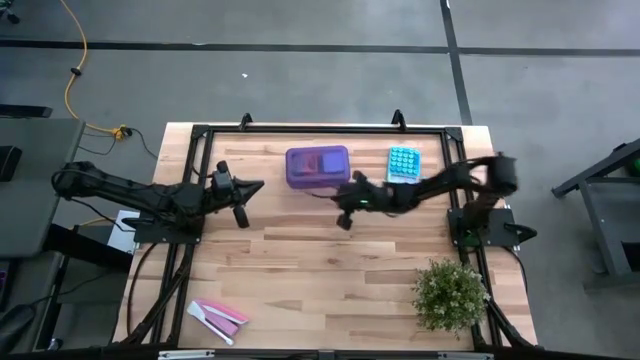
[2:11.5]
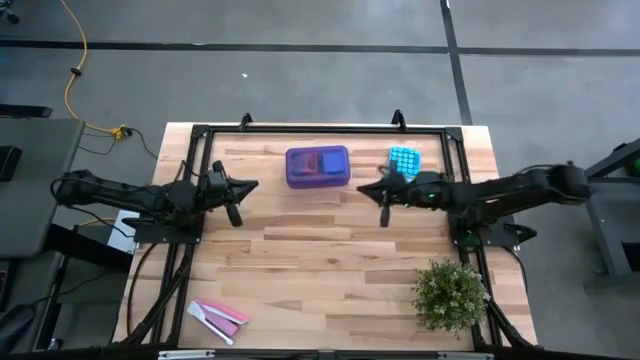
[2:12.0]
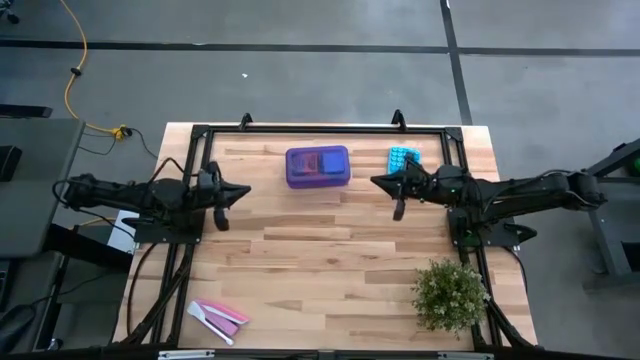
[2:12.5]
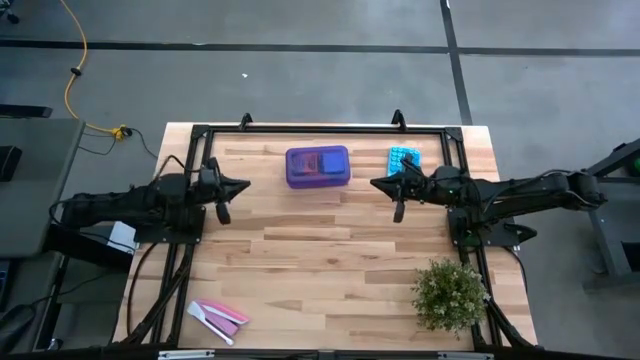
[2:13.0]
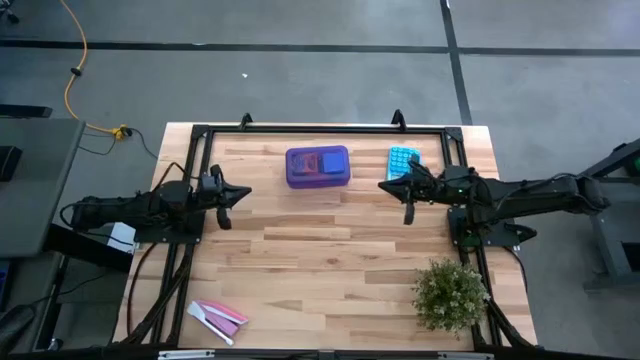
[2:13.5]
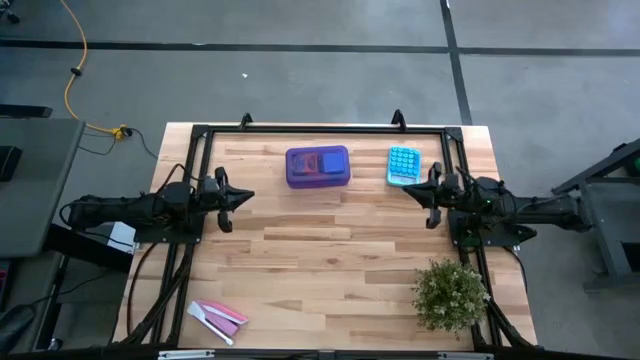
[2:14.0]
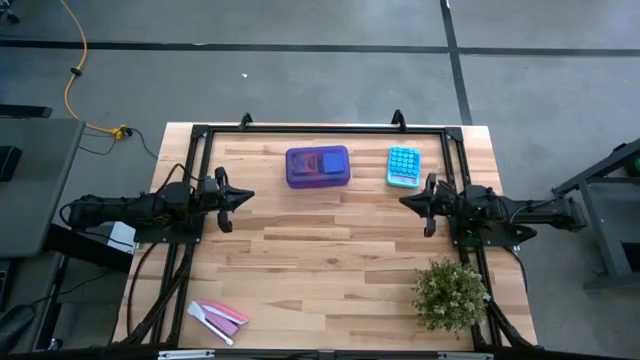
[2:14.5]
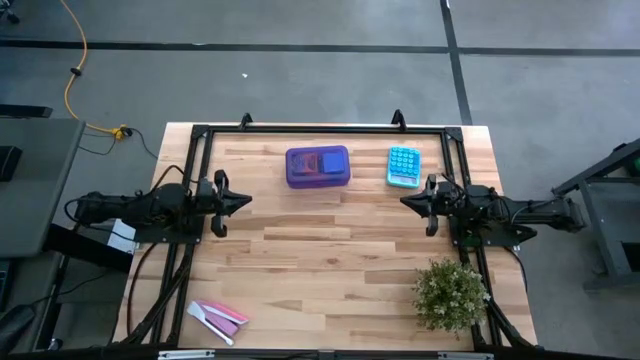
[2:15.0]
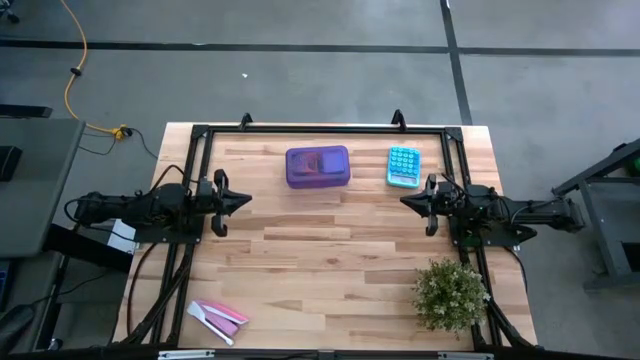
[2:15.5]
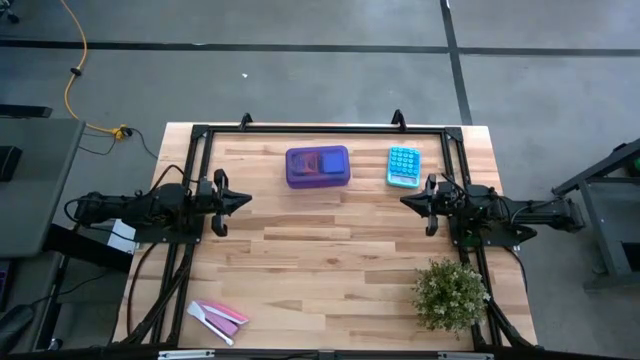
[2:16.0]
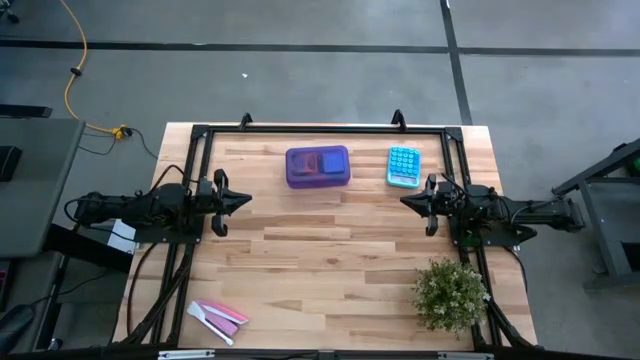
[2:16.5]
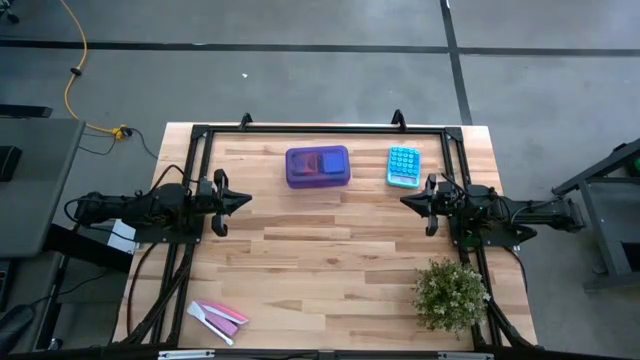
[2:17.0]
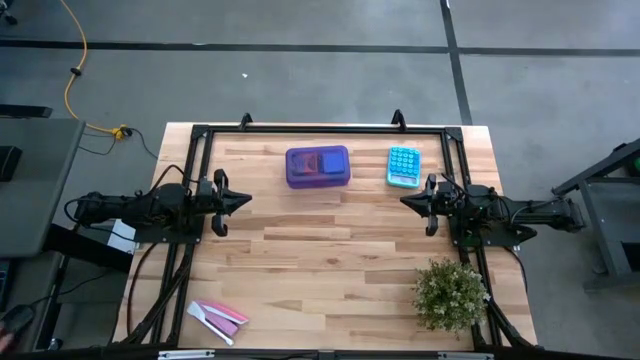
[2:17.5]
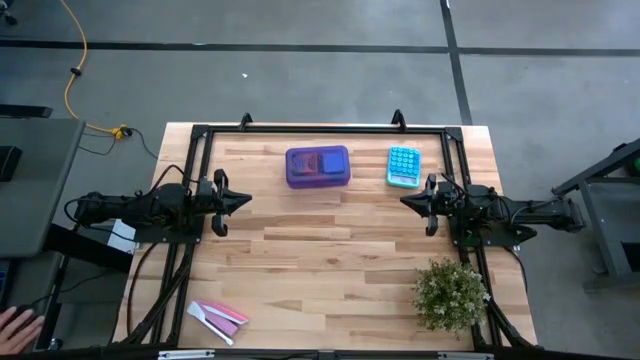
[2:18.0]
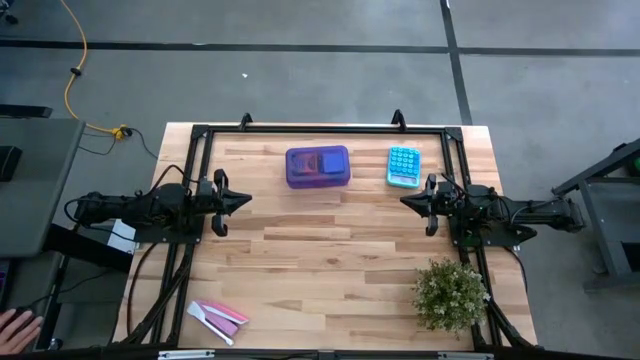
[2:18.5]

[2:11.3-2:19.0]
Task: Pack school essentials
Return to Home Position

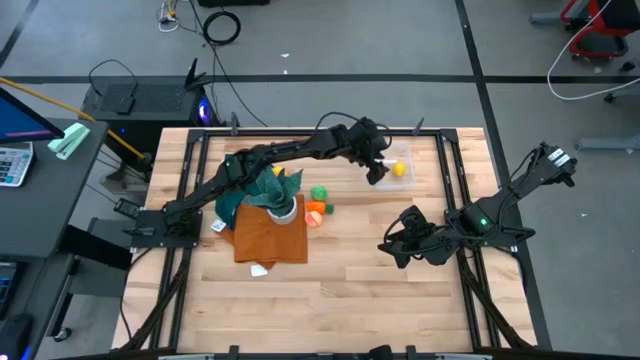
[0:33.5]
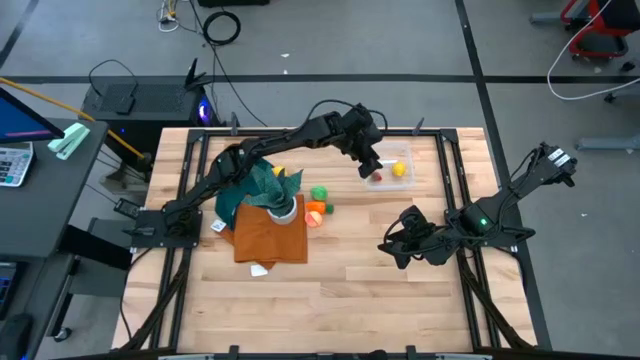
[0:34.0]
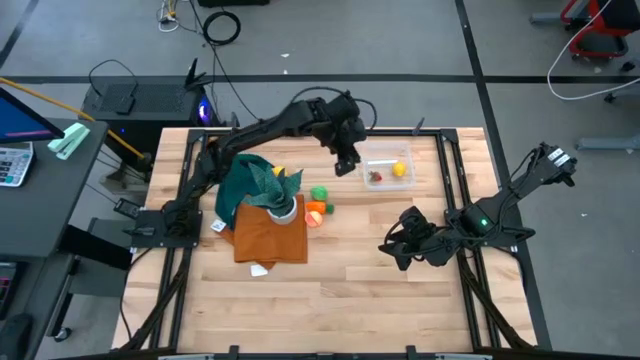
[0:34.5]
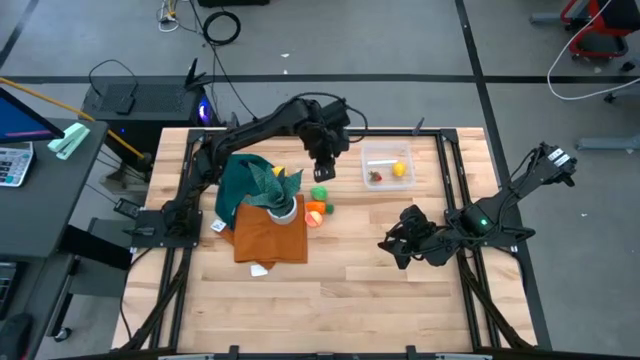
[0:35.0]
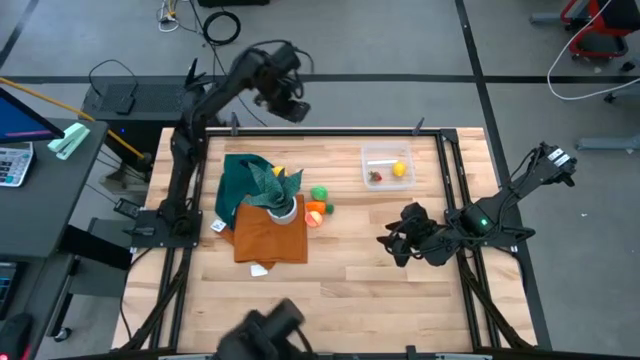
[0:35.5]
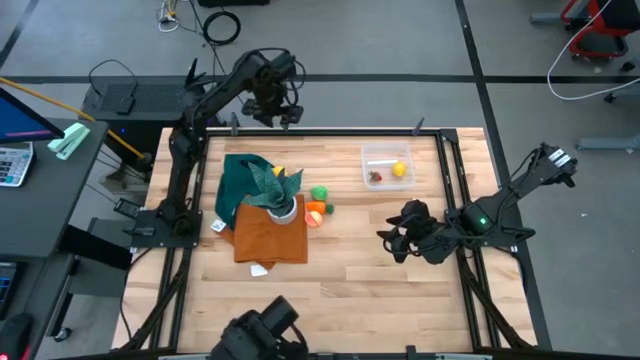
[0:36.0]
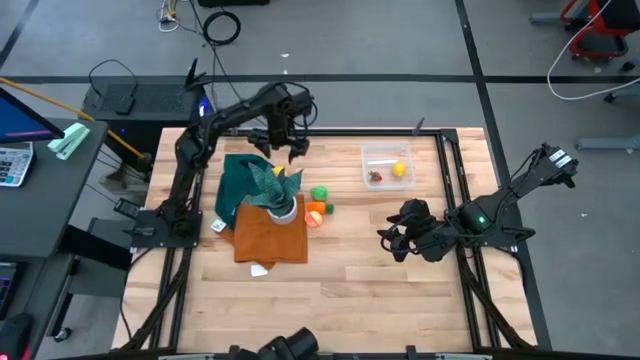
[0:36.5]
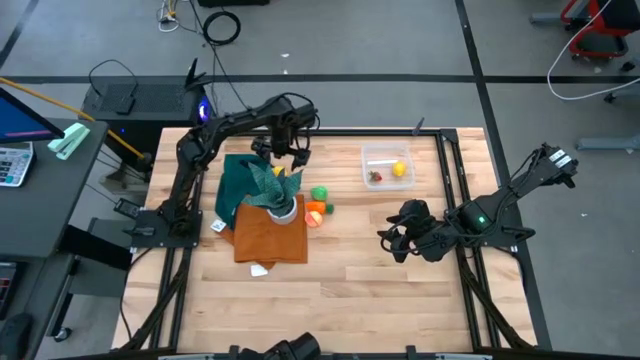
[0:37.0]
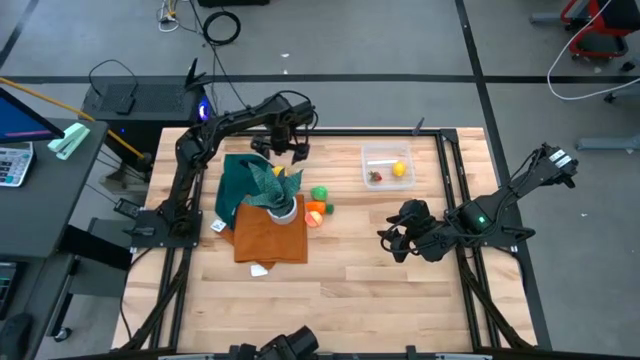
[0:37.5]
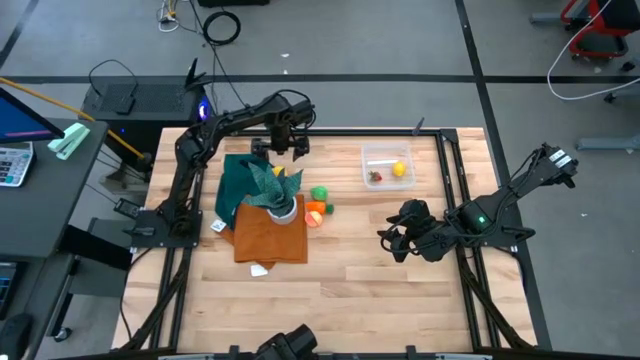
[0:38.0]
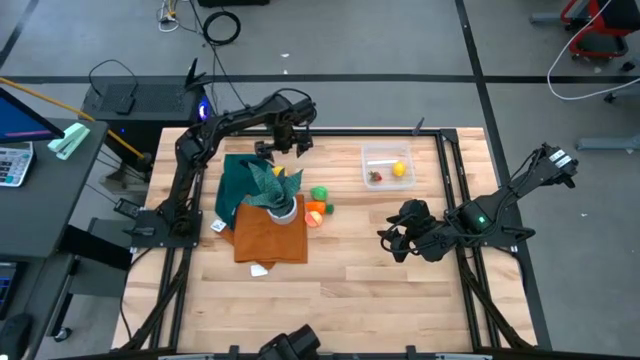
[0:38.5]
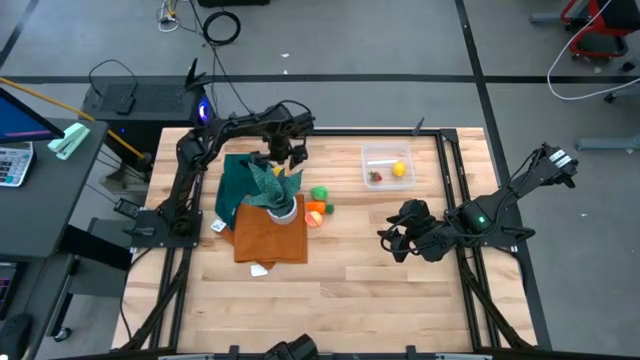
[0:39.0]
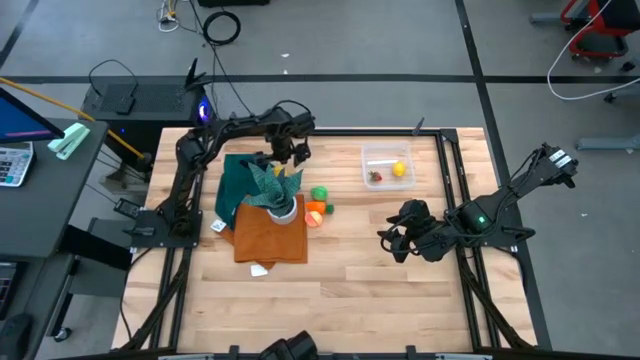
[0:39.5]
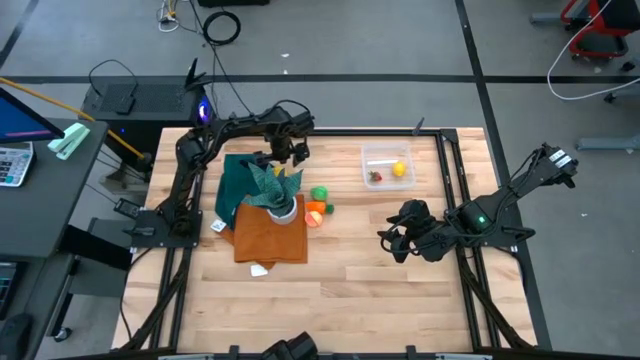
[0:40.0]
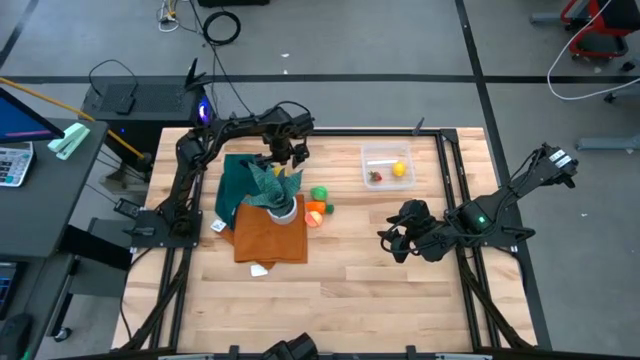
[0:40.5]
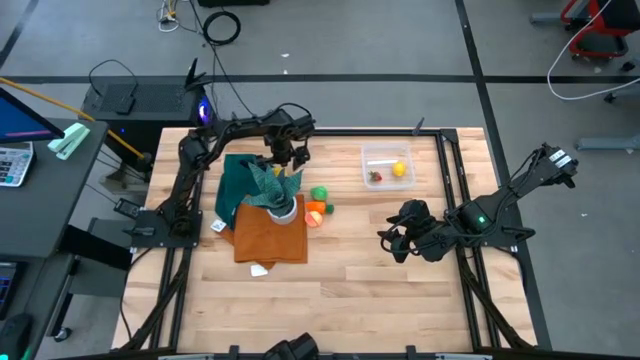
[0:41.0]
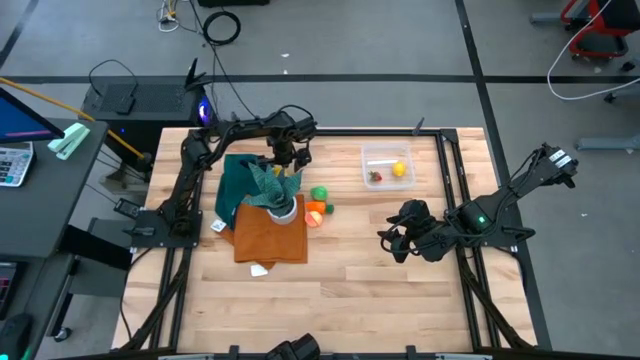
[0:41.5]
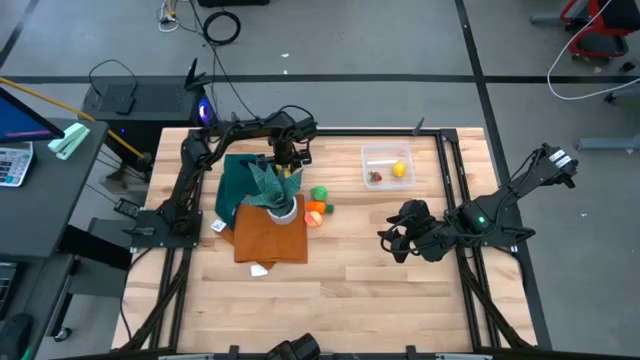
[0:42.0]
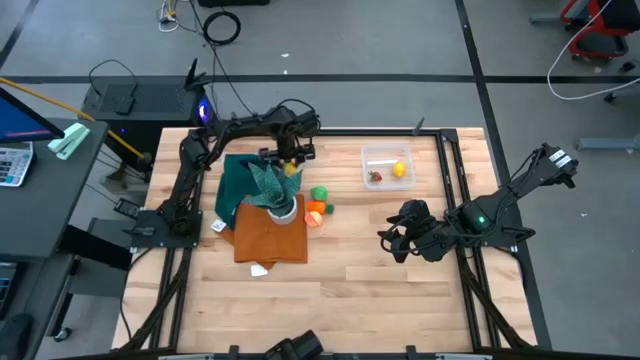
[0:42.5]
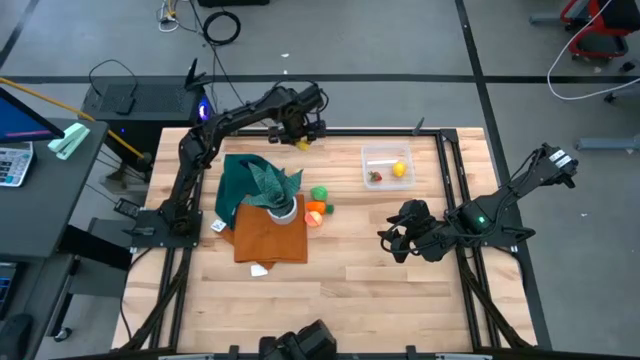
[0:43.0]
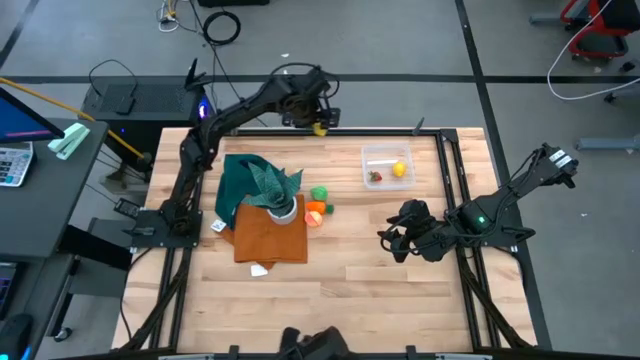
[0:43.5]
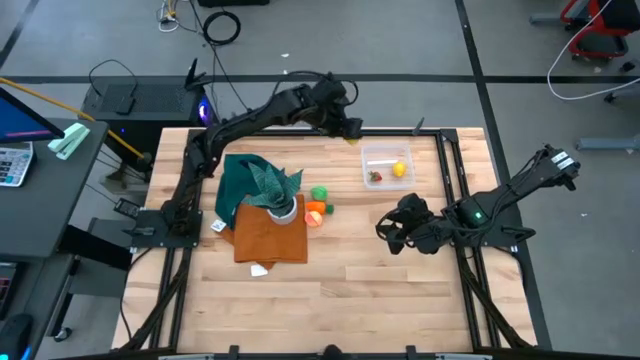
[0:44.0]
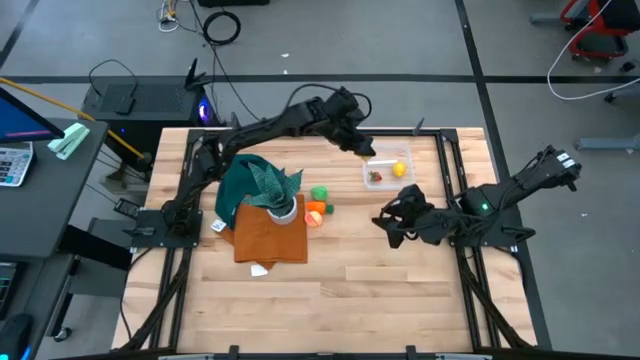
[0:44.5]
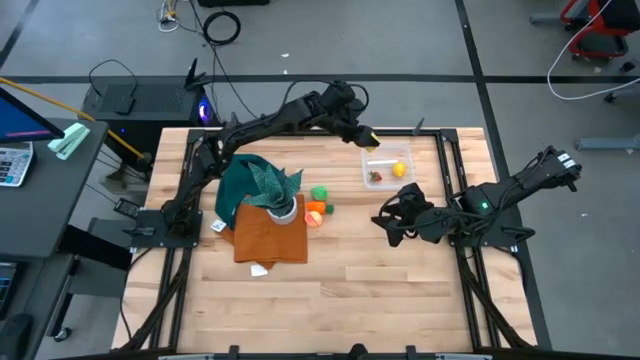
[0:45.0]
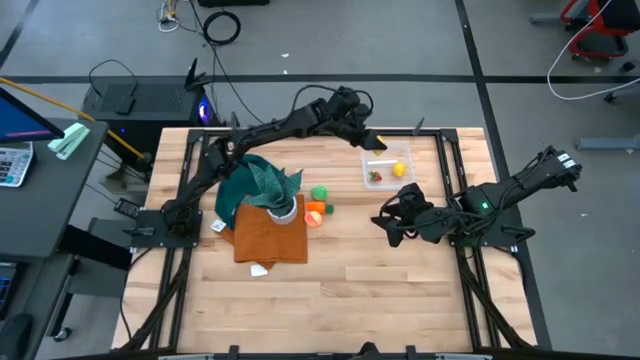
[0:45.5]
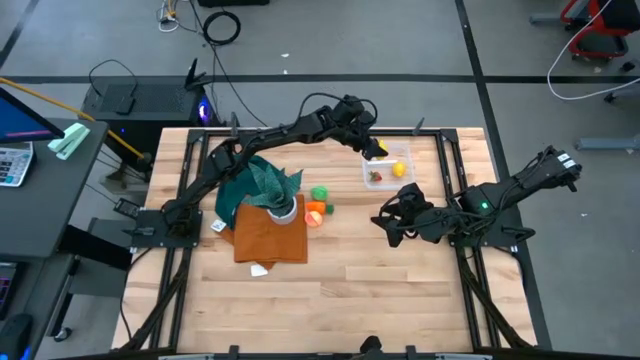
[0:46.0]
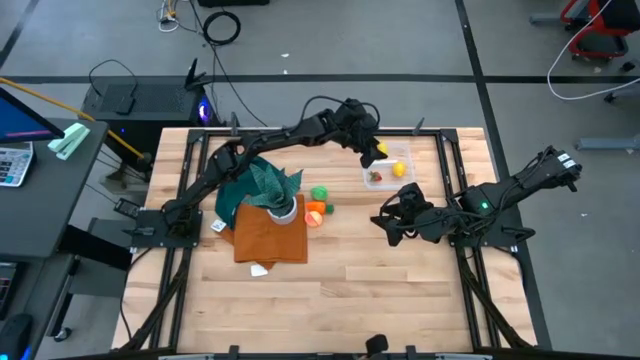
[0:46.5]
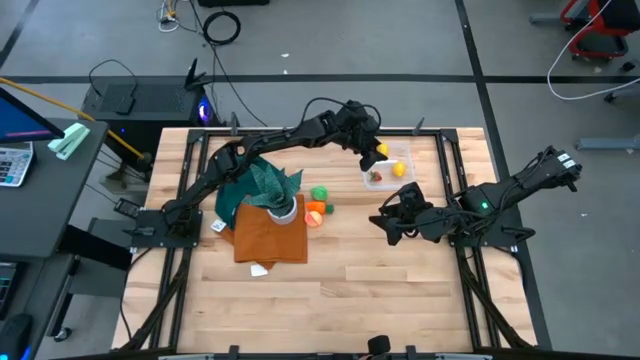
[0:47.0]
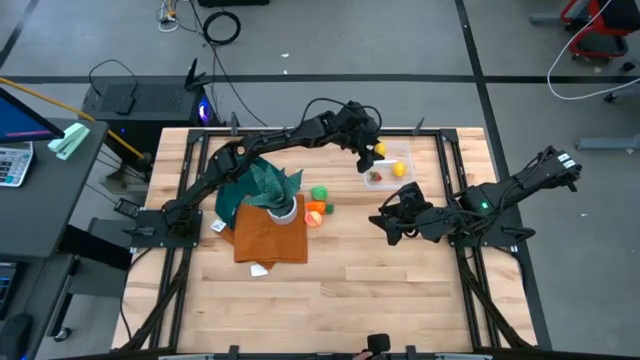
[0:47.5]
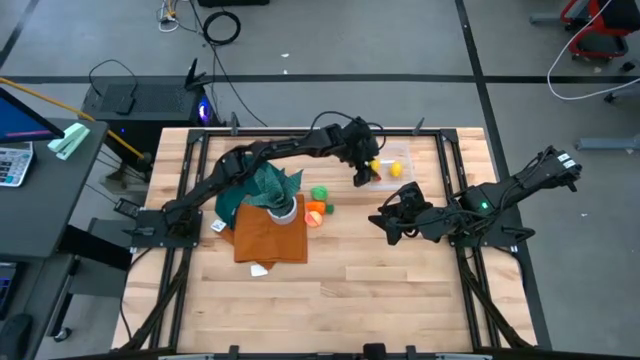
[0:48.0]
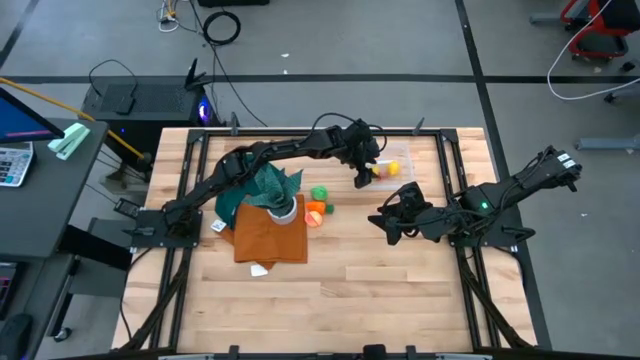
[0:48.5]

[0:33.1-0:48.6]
Task: Pick and placing Produce into tupperware
Put the lemon into the transparent bin
